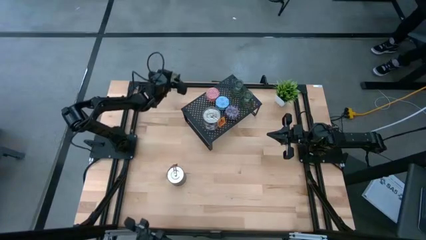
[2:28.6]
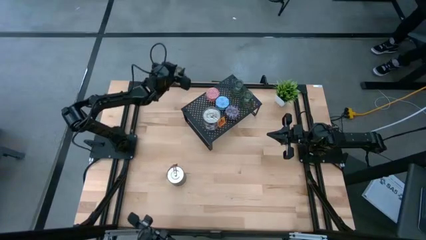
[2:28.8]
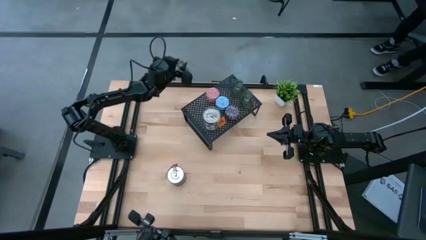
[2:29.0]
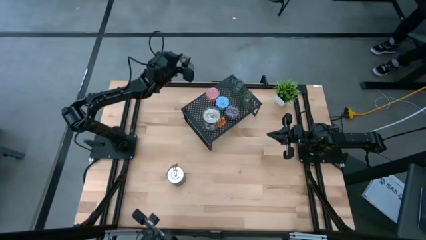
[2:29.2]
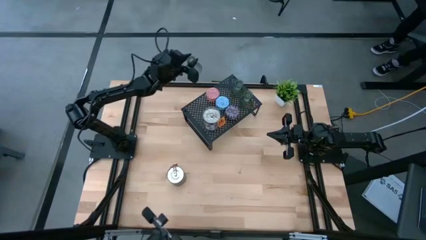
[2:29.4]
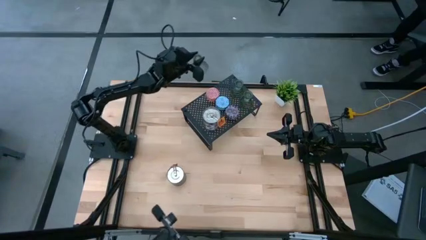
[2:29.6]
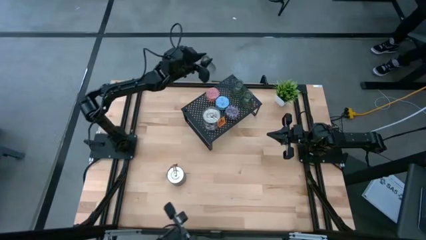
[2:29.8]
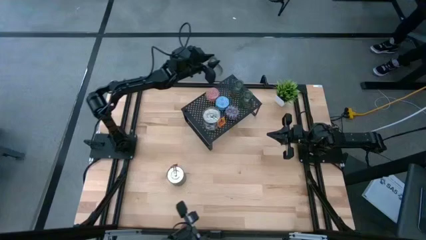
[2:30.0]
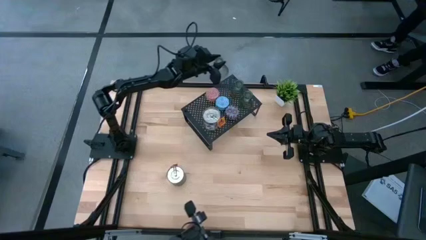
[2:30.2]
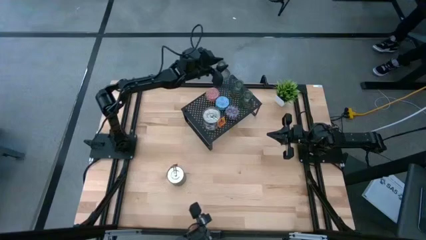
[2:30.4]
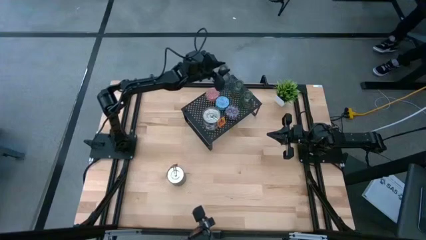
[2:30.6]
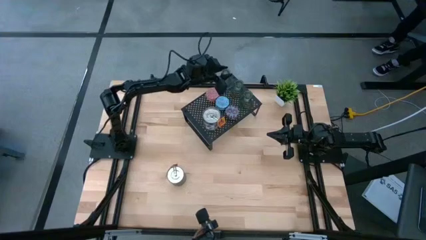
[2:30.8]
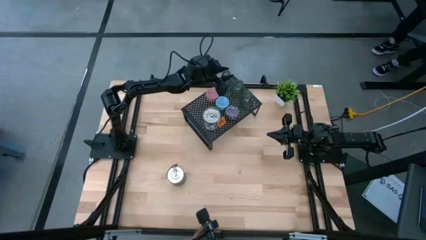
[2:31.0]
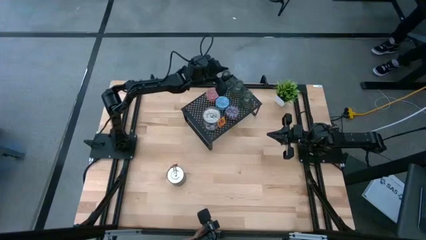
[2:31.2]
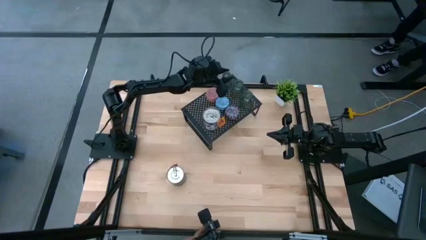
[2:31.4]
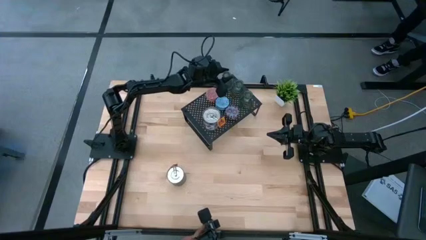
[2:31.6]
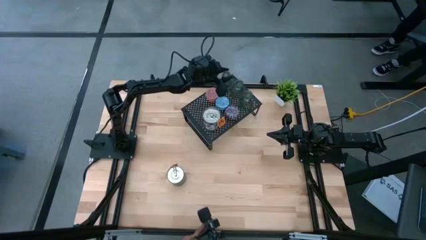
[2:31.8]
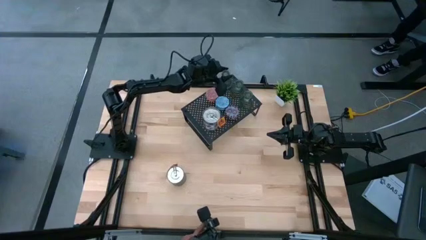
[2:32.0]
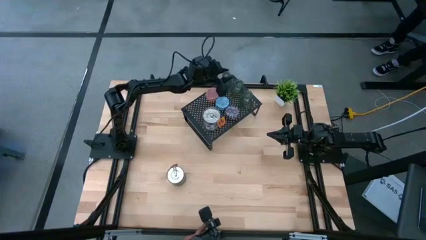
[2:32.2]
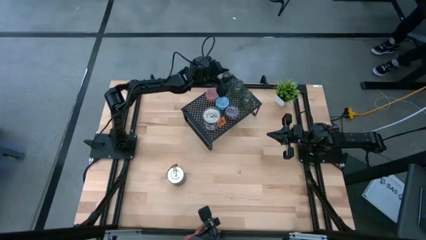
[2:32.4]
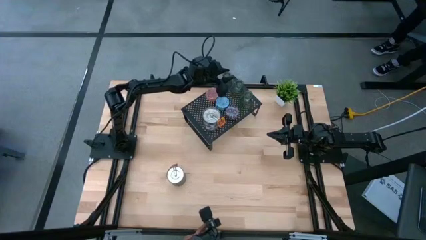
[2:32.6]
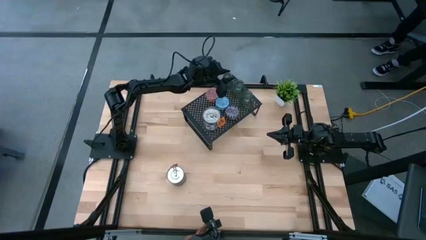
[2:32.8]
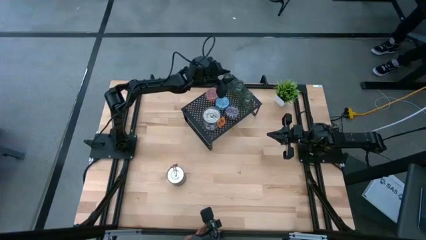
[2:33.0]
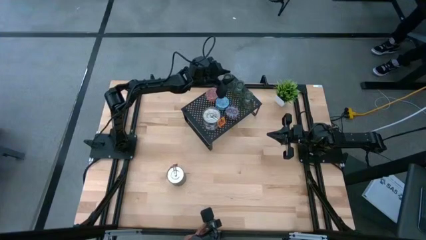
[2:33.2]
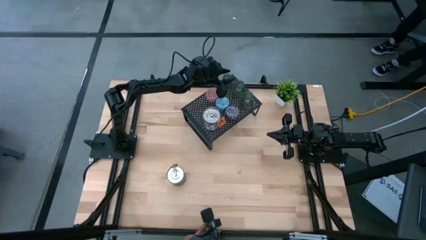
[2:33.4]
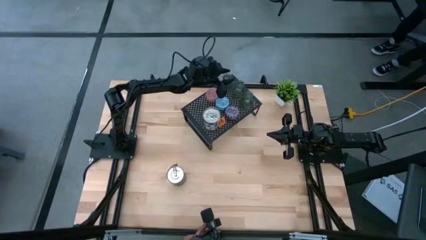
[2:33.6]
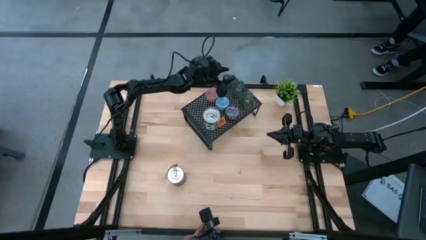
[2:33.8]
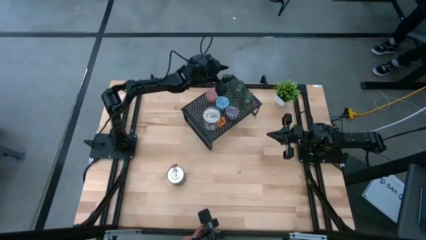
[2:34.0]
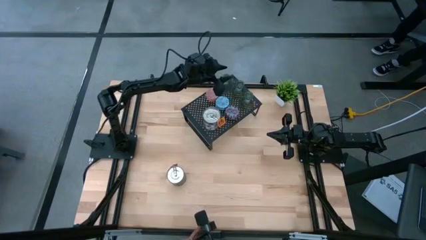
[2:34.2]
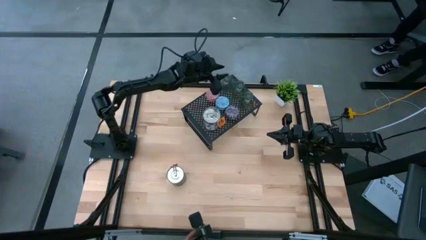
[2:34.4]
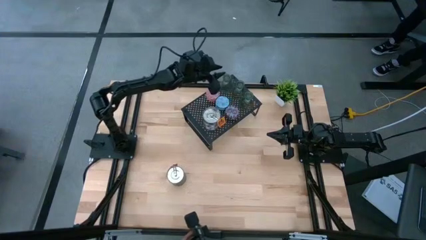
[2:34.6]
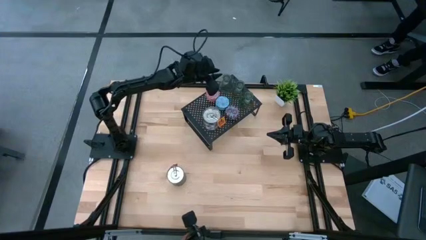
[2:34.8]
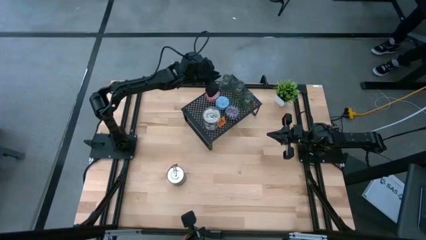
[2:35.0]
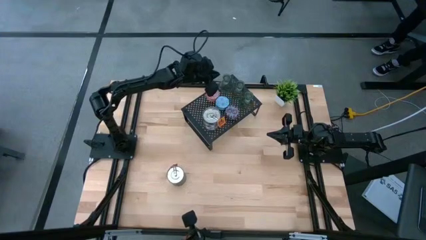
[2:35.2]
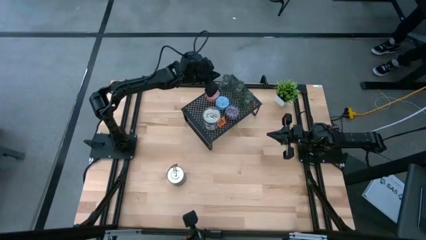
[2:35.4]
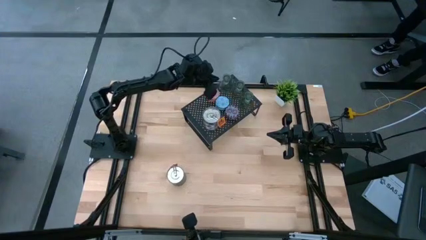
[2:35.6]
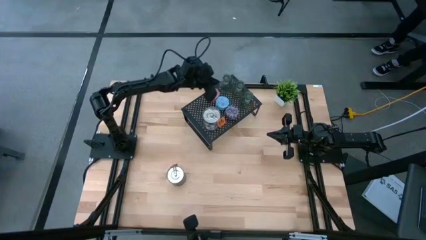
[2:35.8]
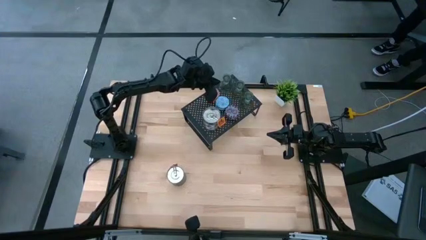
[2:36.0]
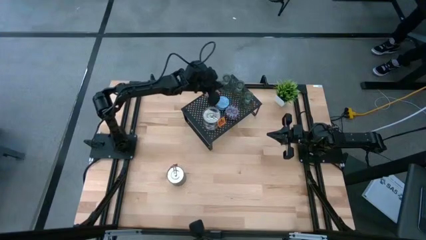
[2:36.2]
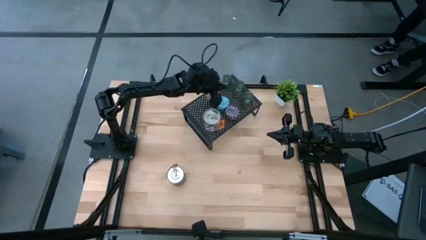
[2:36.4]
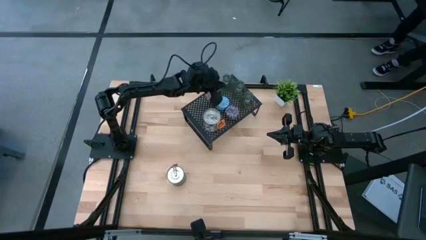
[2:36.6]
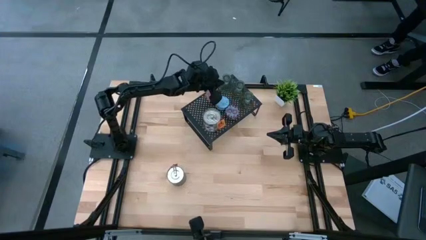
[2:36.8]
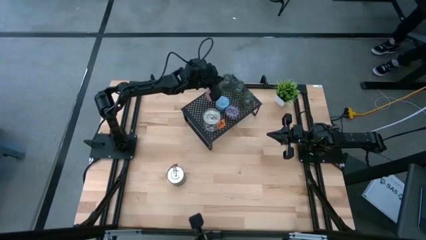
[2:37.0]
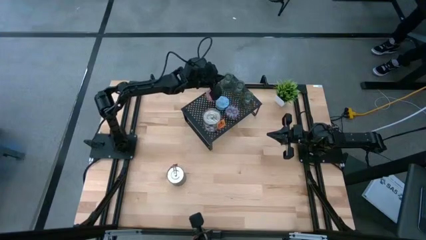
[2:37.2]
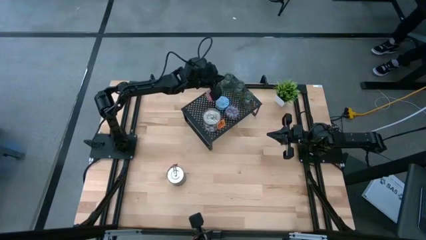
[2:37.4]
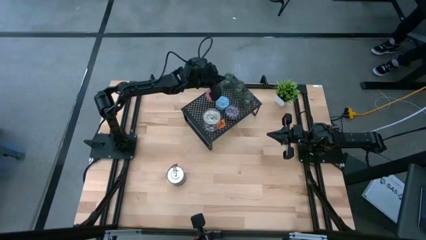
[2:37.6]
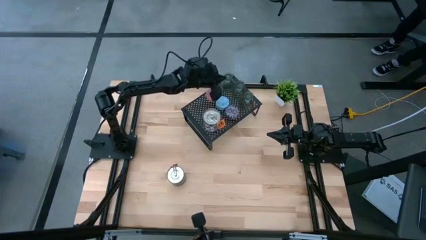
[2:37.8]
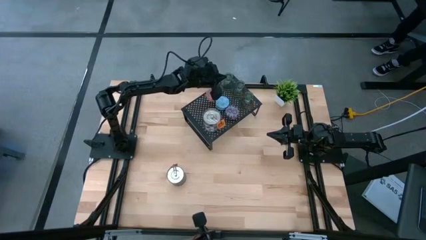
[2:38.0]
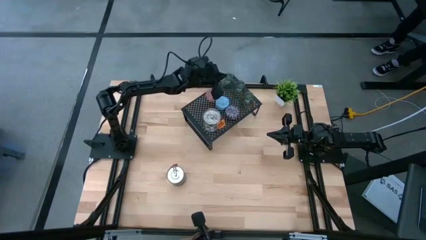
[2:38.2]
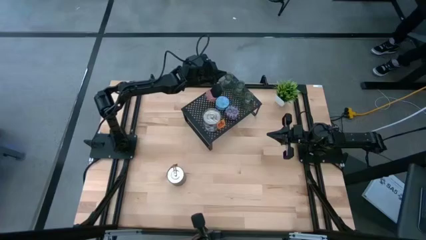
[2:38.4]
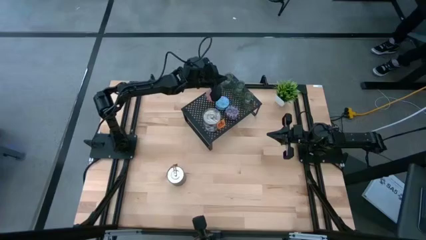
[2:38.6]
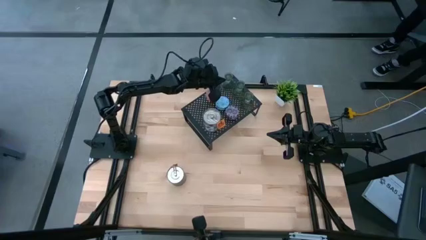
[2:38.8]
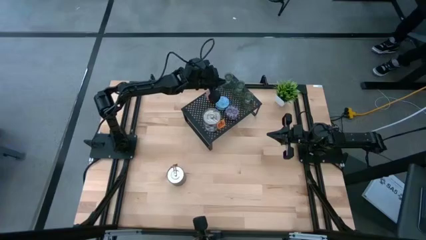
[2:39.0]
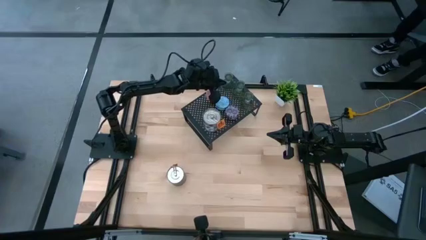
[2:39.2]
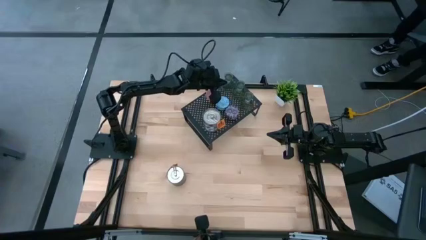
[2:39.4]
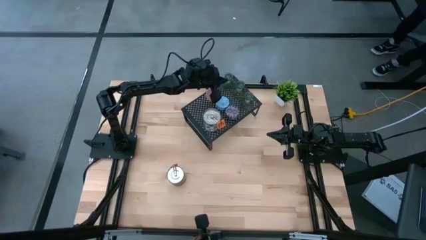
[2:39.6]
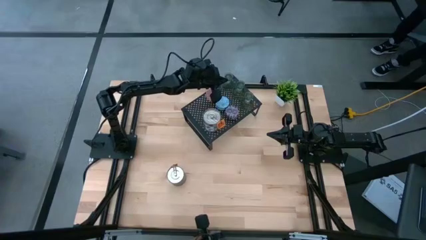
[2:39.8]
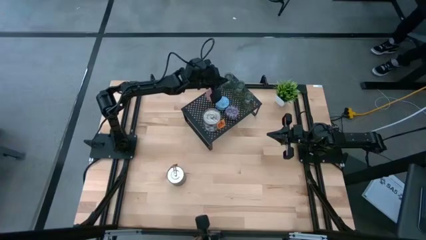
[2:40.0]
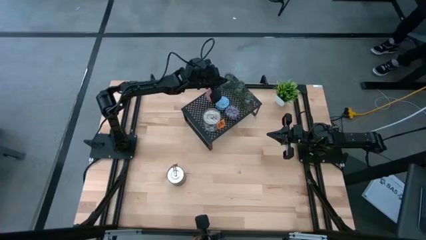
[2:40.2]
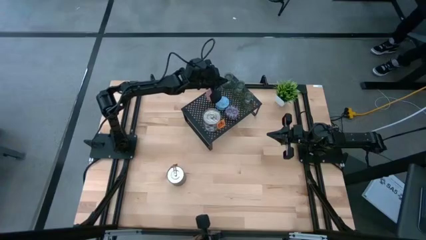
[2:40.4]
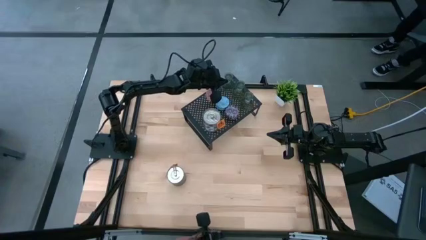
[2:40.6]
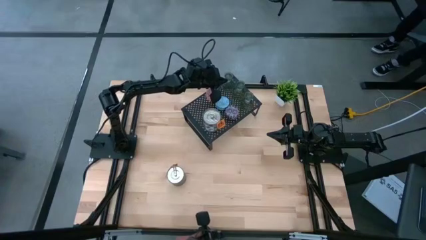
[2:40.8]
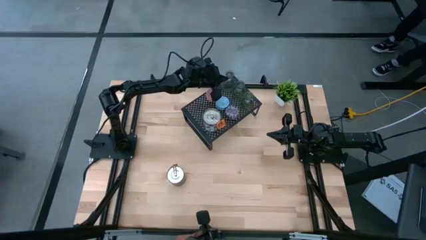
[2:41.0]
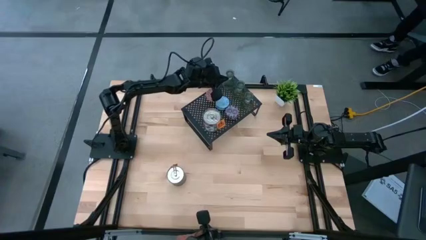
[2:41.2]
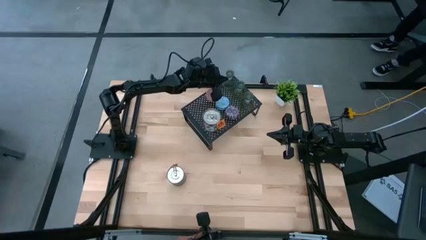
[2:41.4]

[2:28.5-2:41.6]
Task: Pick & Place candle stick holders
Put the green glass candle holder on the shelf aligned with the green glass candle holders
